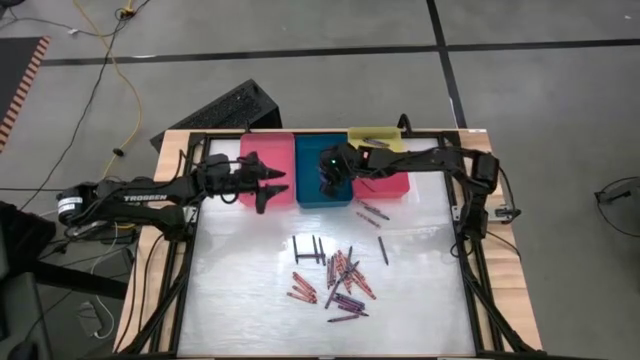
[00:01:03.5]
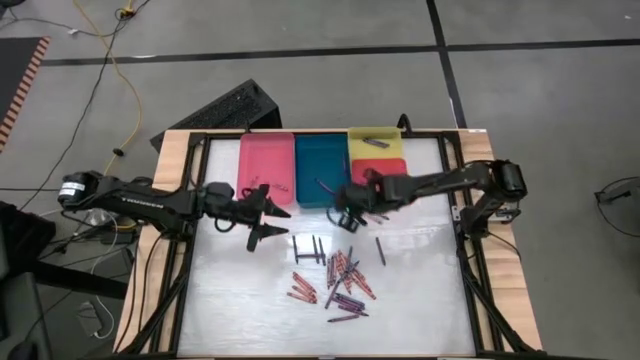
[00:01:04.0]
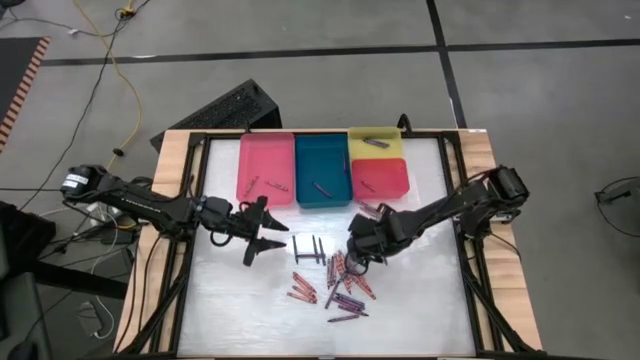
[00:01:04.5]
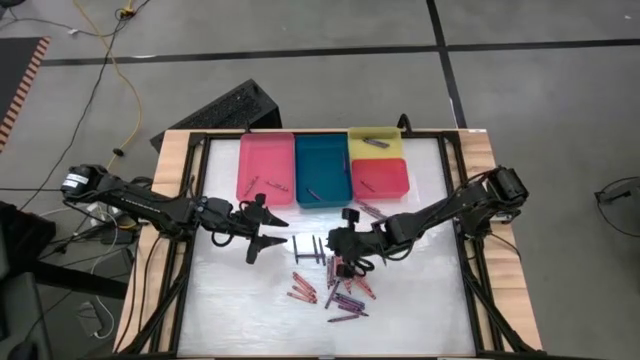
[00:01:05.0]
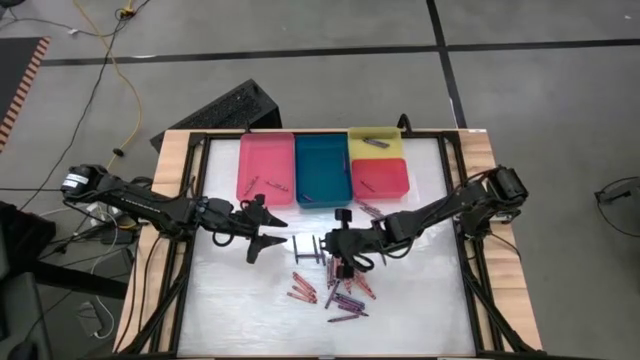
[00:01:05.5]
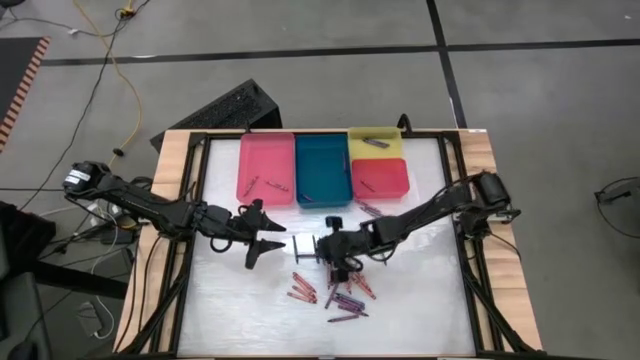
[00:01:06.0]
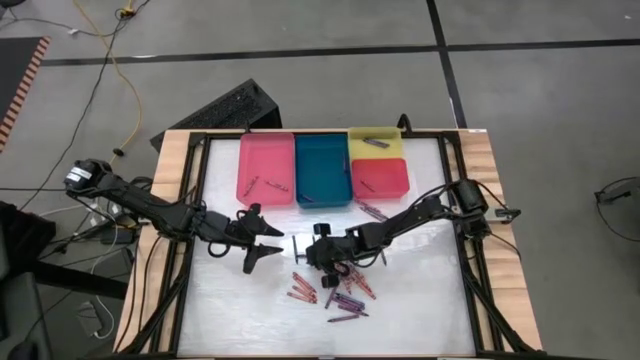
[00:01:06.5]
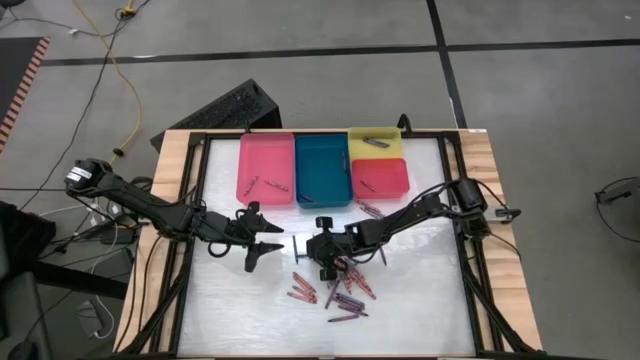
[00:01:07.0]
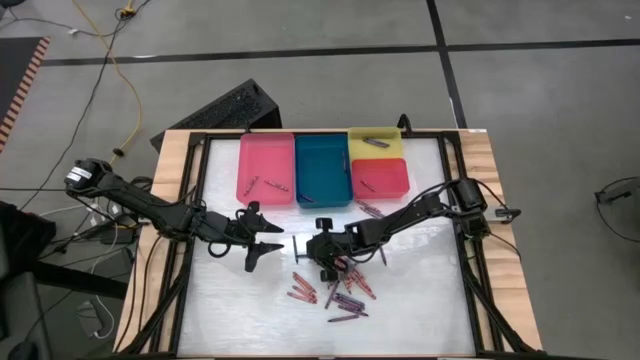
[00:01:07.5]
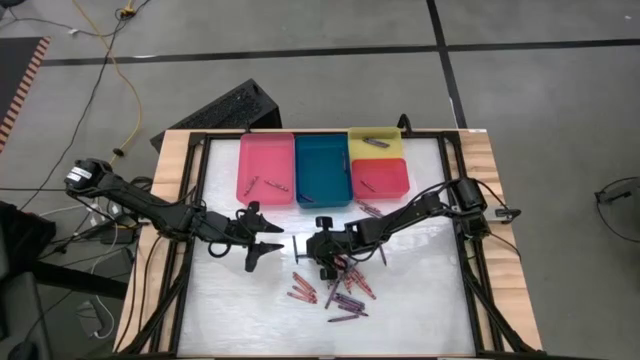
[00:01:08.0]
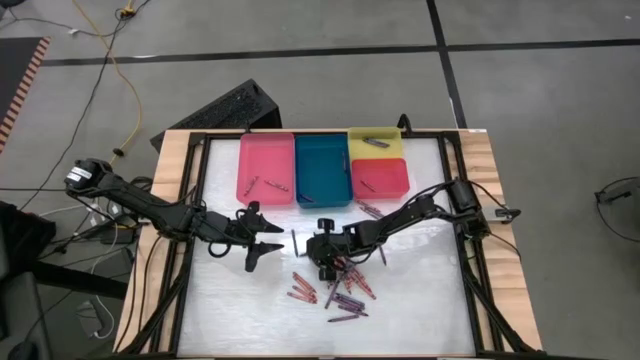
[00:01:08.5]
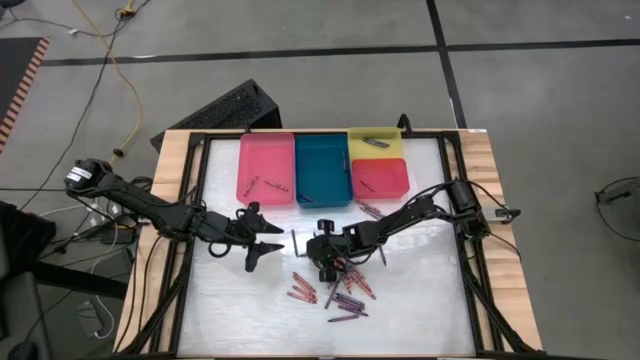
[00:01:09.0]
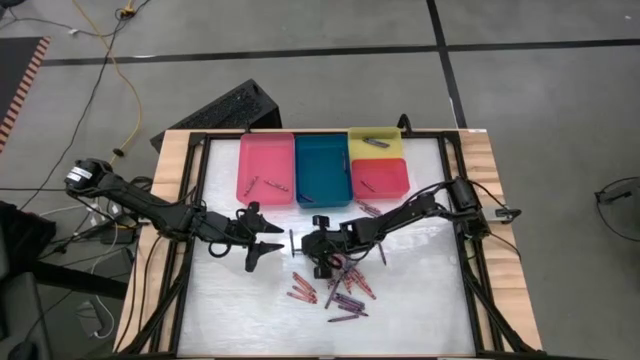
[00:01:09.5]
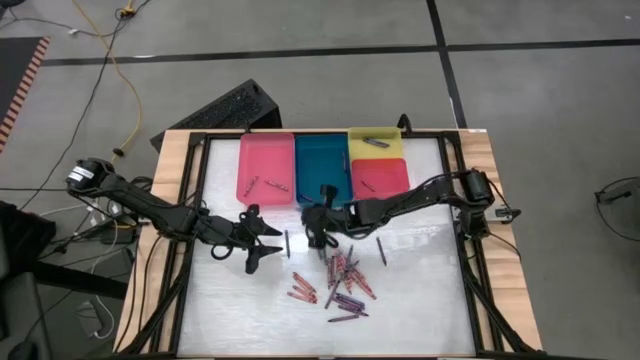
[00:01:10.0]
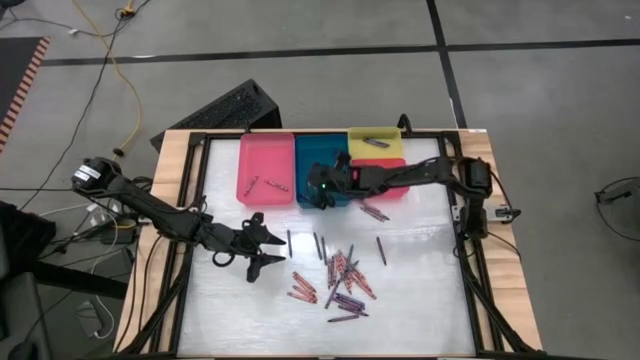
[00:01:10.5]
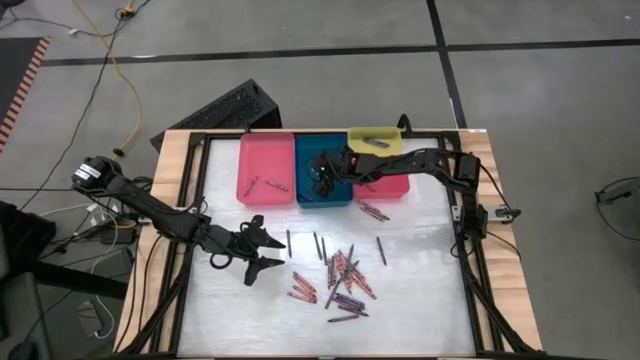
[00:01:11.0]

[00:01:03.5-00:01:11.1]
Task: Sort crayons
Put the violet crayon into the blue bin

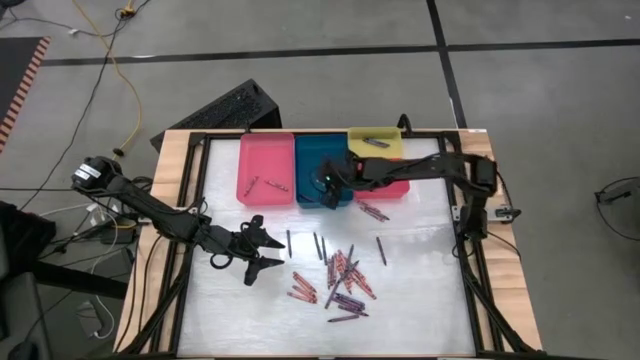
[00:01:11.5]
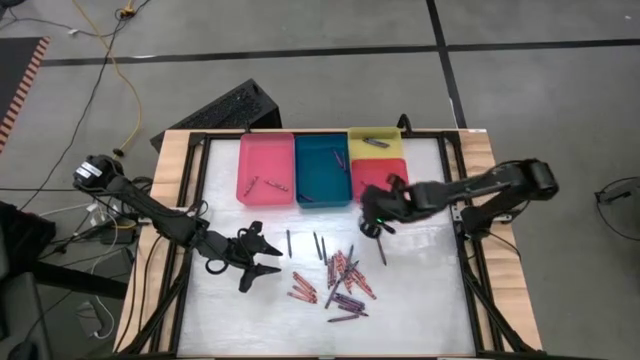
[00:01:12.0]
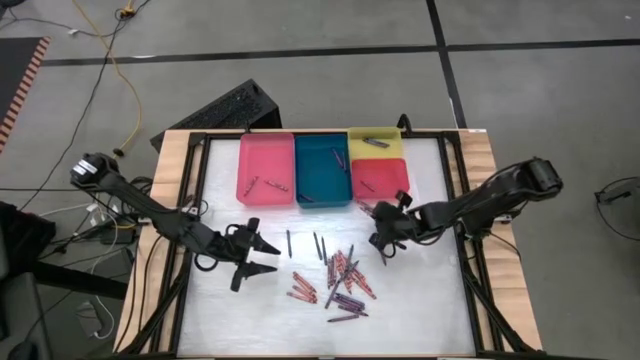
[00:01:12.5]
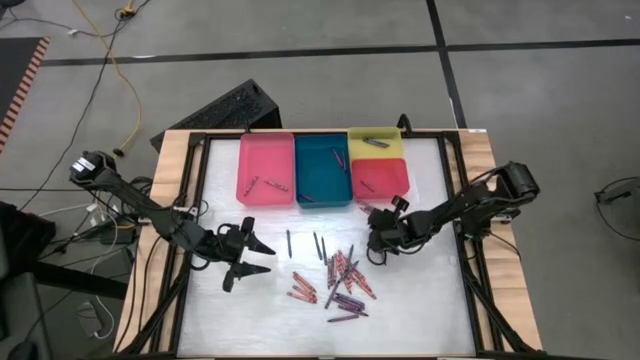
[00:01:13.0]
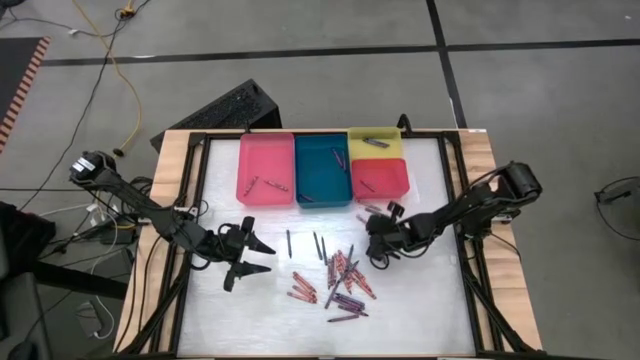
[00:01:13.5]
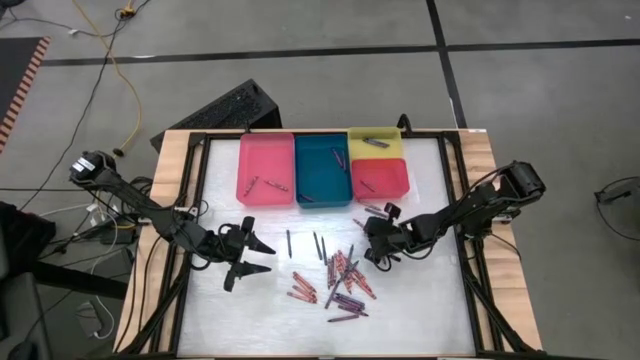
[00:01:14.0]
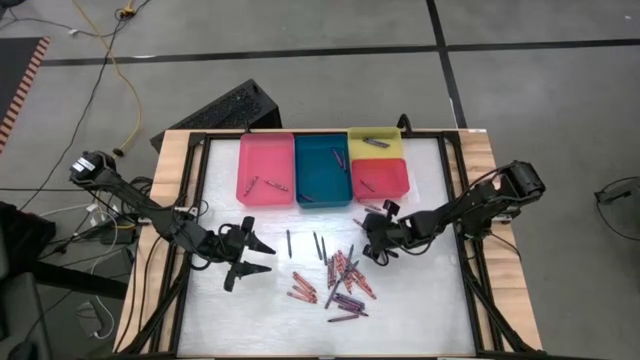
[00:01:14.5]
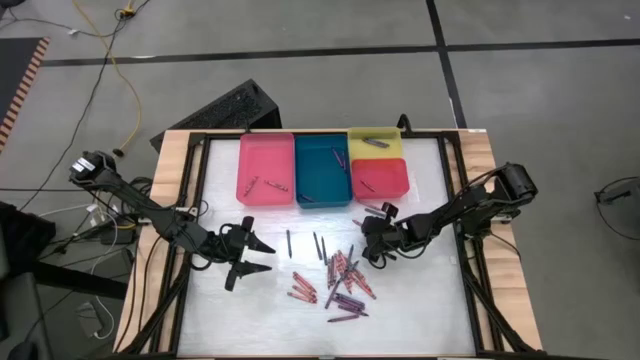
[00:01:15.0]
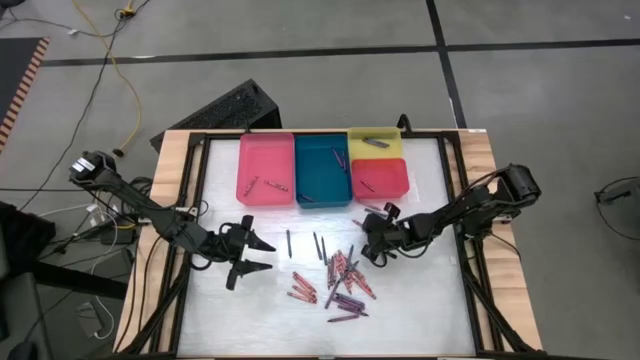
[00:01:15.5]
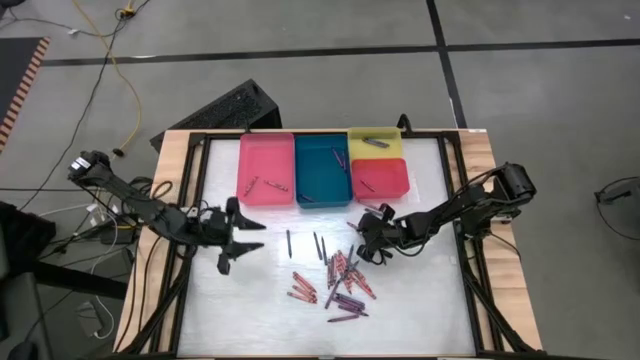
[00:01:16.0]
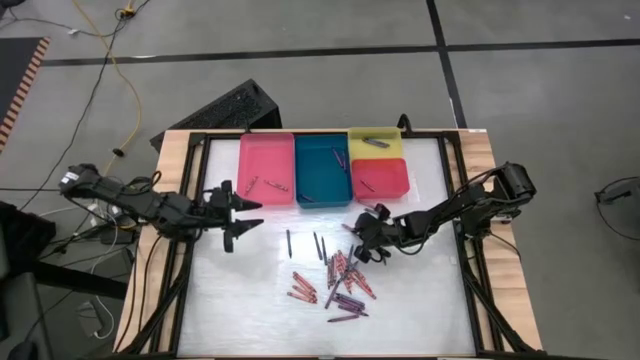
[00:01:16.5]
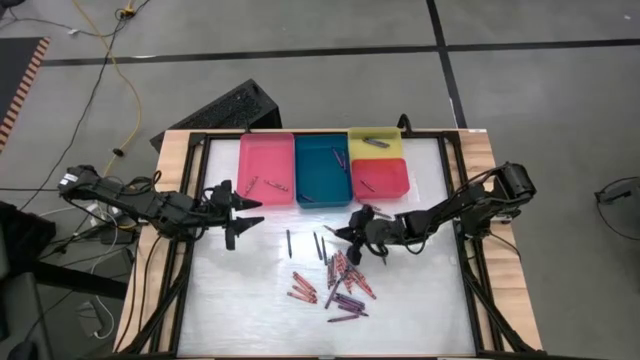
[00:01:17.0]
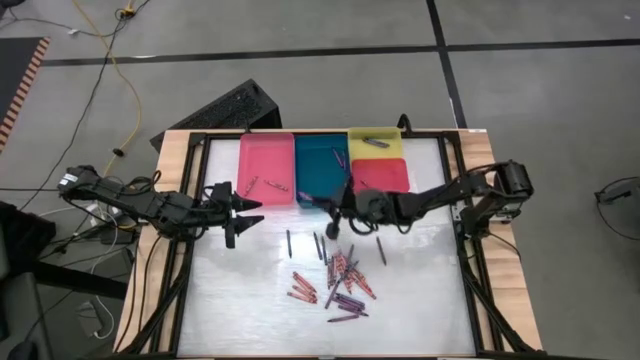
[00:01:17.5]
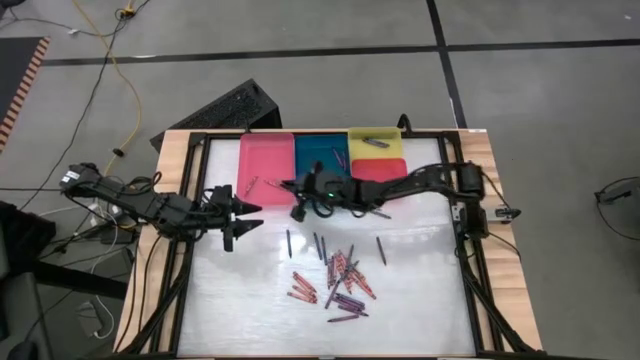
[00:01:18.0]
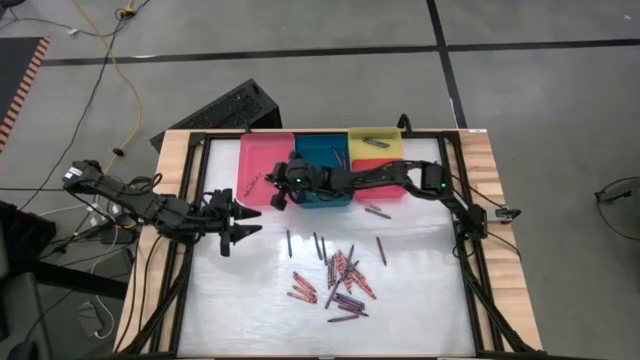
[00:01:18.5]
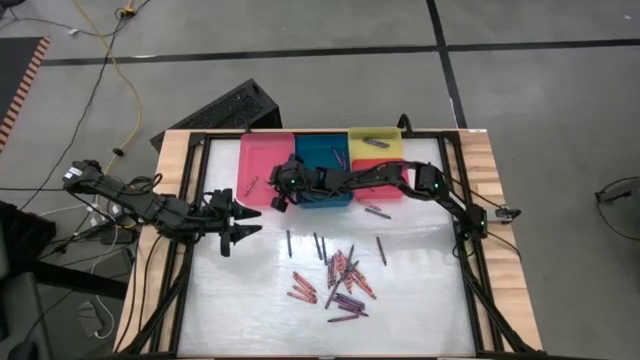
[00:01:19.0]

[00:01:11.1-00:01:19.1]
Put the pink crayon into the pink bin

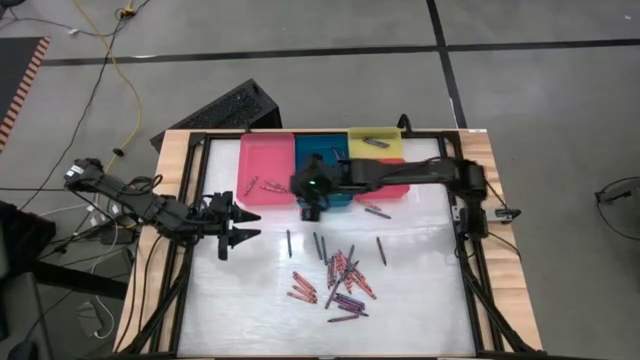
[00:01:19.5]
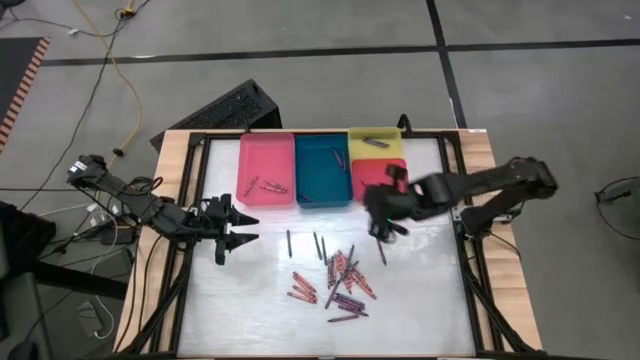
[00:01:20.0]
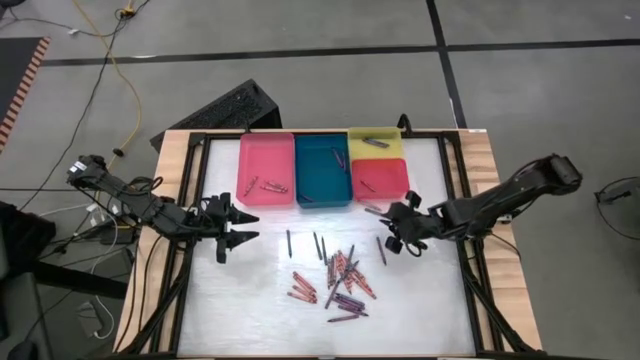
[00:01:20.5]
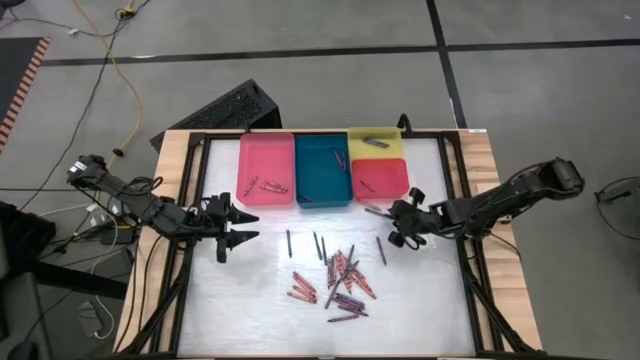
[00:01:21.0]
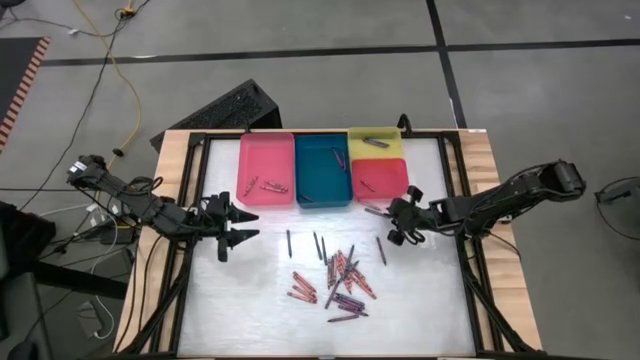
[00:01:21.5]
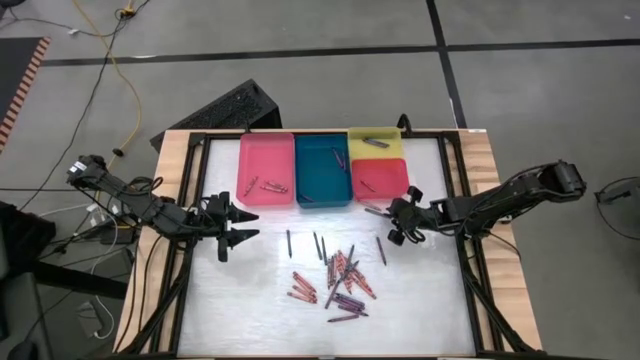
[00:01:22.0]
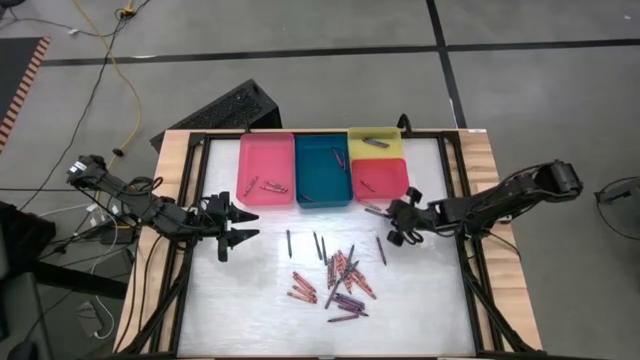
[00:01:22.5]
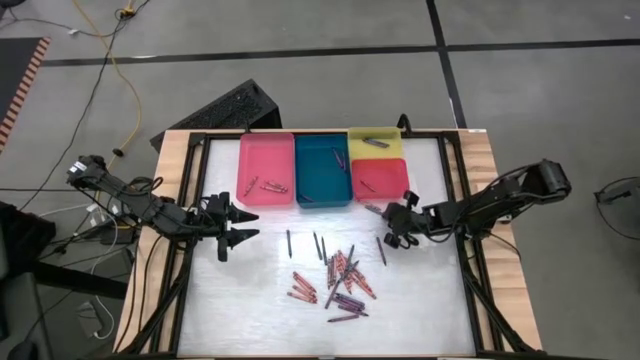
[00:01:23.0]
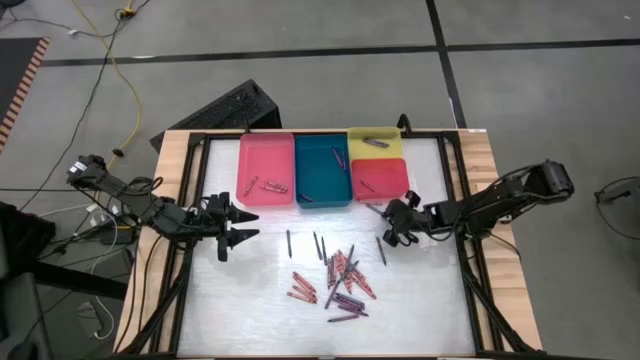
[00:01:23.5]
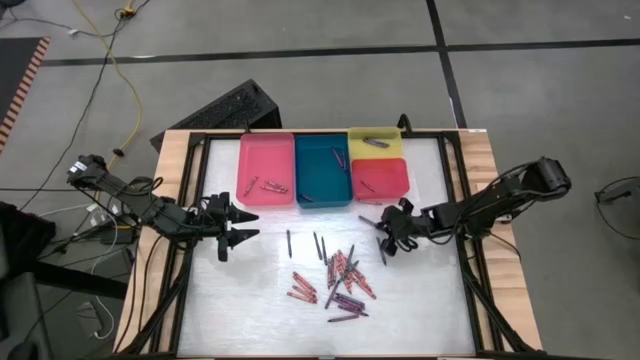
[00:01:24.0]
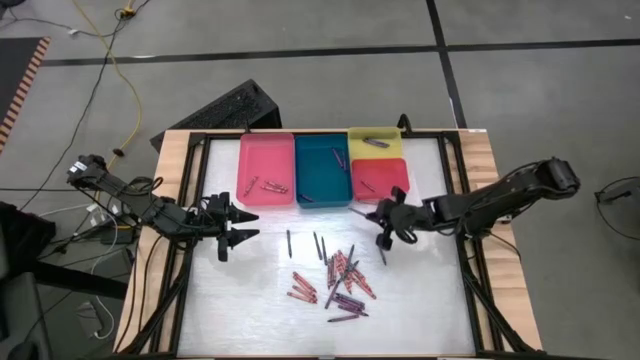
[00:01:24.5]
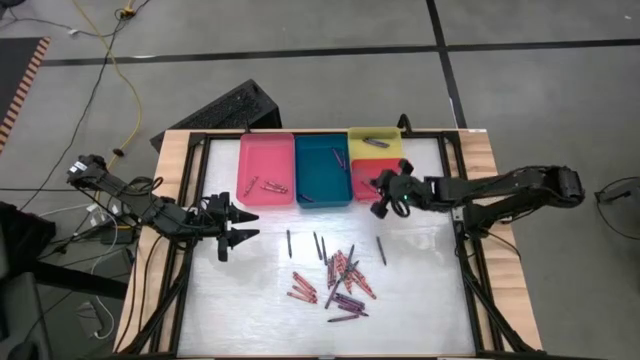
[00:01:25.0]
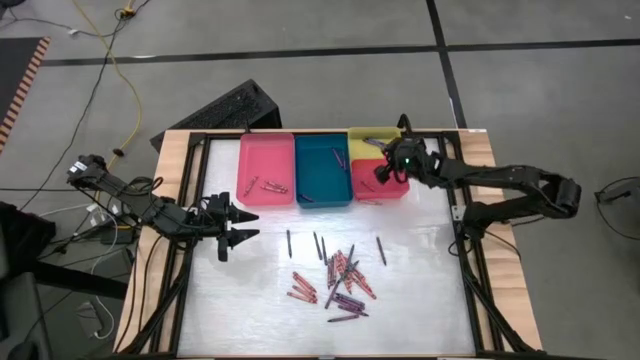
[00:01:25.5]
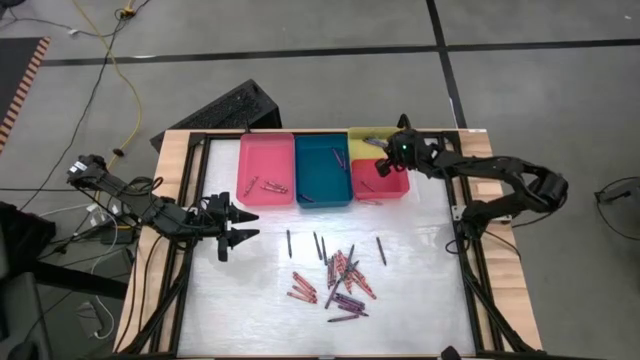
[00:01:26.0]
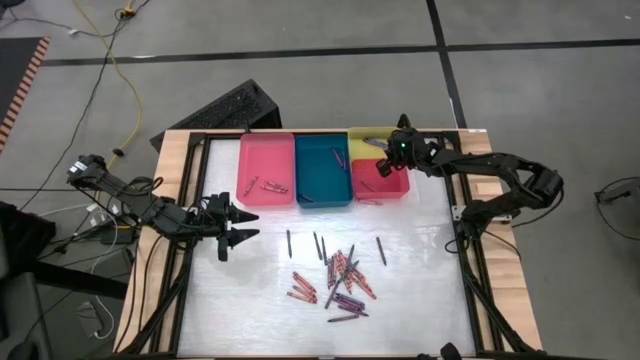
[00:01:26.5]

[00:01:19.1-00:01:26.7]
Put the blue crayon into the yellow bin
